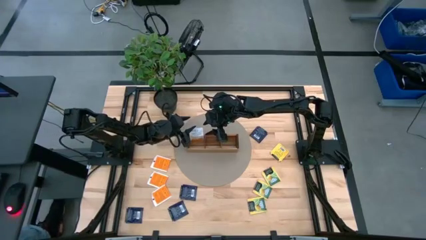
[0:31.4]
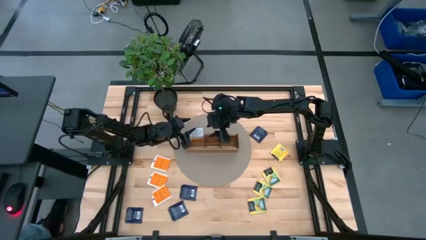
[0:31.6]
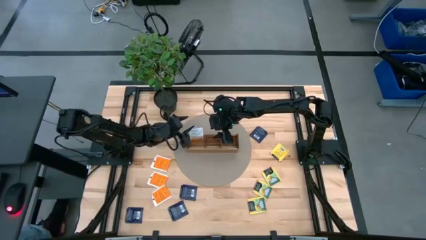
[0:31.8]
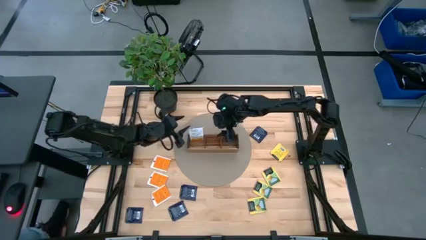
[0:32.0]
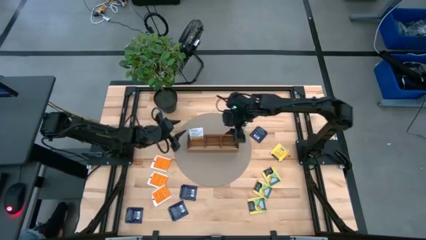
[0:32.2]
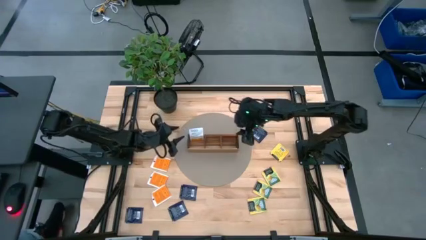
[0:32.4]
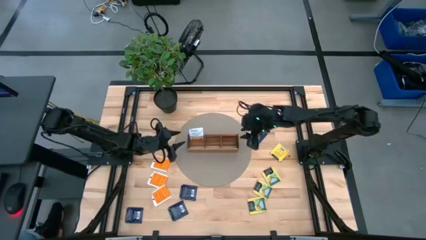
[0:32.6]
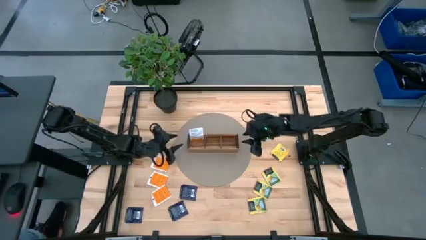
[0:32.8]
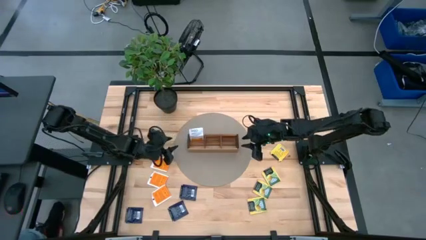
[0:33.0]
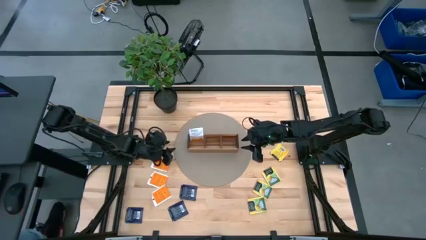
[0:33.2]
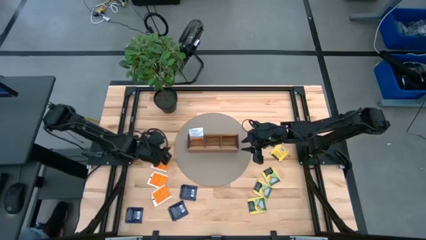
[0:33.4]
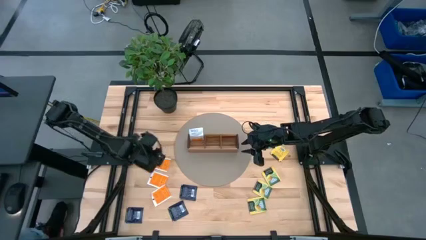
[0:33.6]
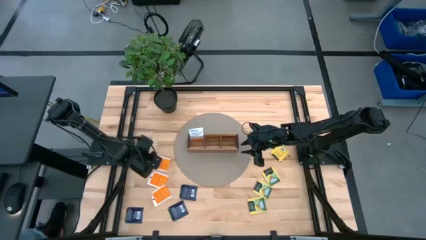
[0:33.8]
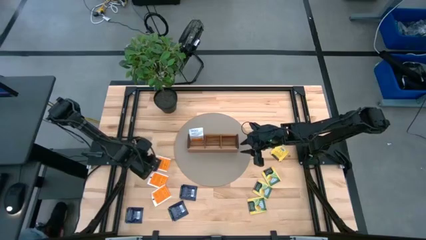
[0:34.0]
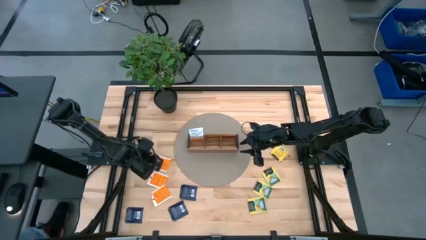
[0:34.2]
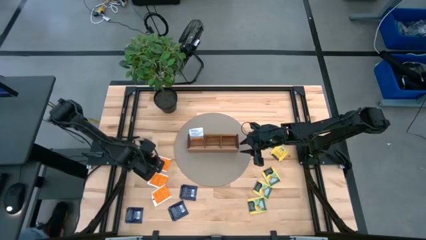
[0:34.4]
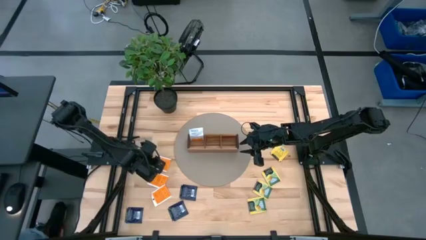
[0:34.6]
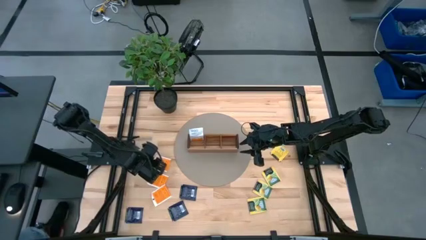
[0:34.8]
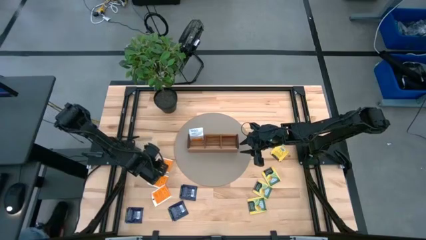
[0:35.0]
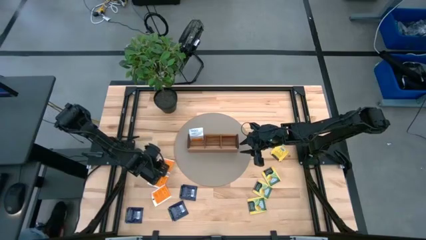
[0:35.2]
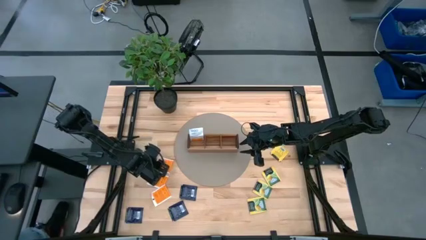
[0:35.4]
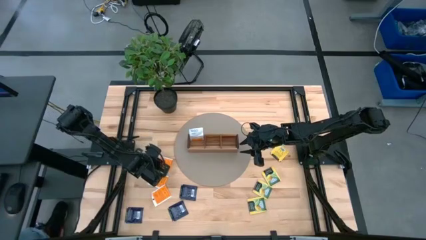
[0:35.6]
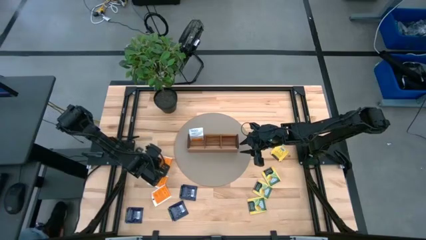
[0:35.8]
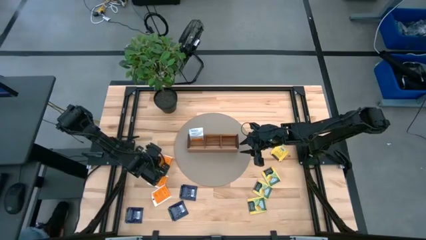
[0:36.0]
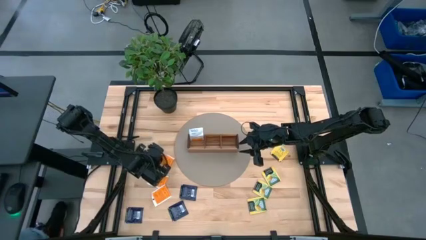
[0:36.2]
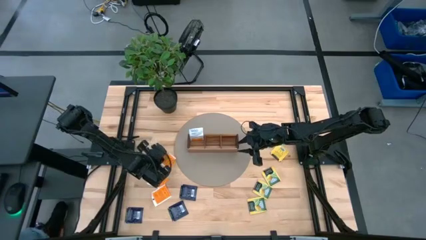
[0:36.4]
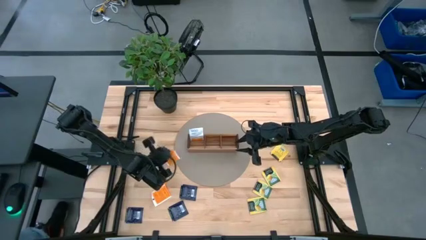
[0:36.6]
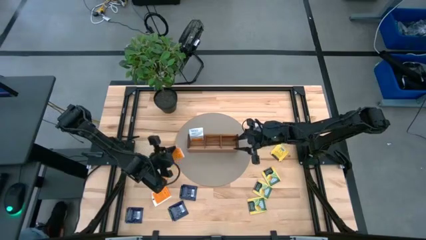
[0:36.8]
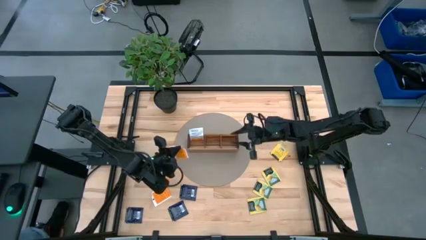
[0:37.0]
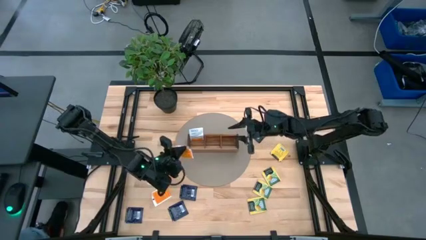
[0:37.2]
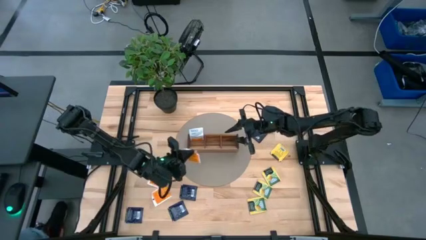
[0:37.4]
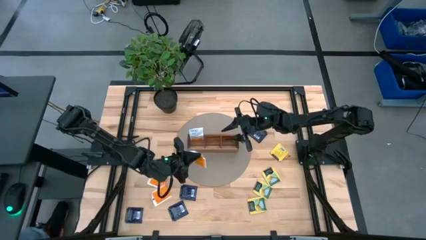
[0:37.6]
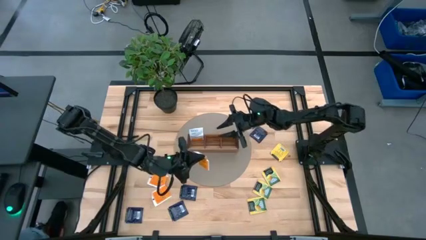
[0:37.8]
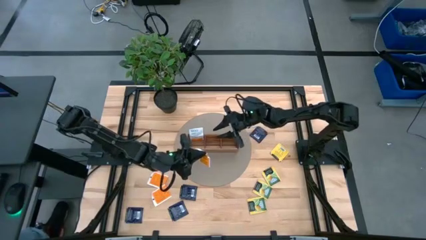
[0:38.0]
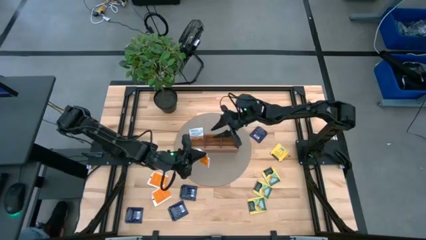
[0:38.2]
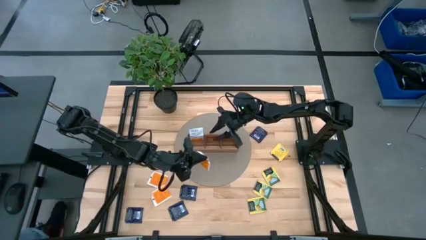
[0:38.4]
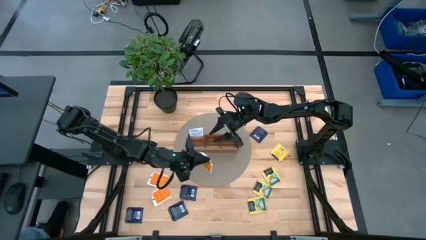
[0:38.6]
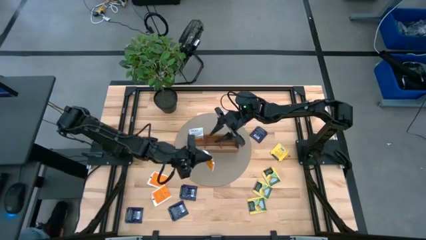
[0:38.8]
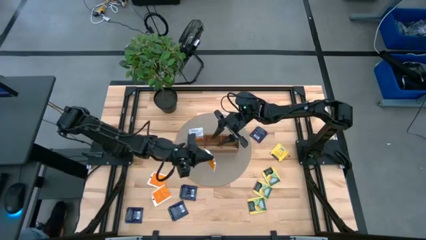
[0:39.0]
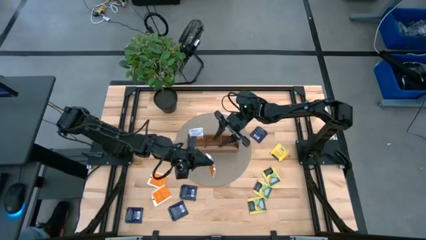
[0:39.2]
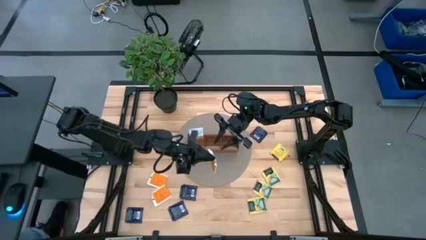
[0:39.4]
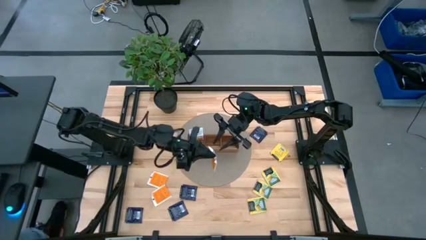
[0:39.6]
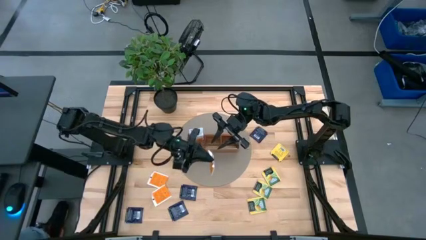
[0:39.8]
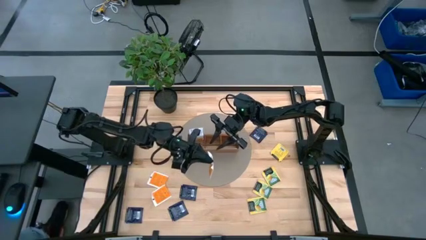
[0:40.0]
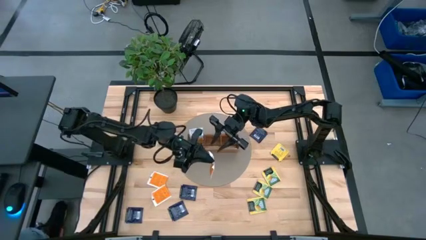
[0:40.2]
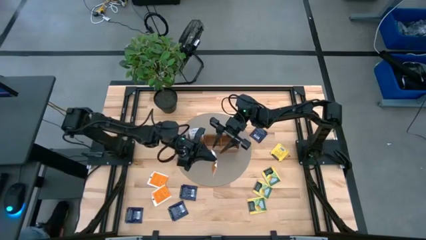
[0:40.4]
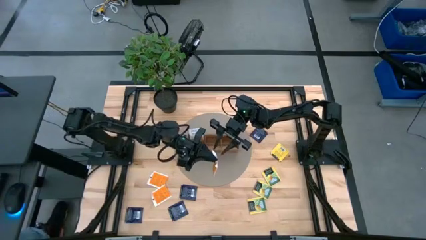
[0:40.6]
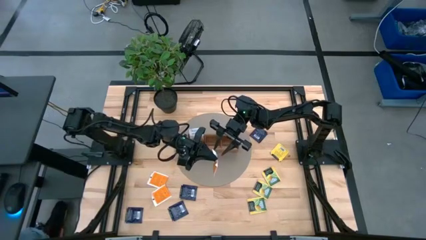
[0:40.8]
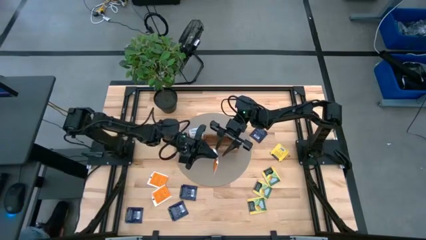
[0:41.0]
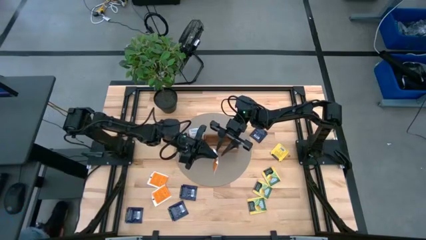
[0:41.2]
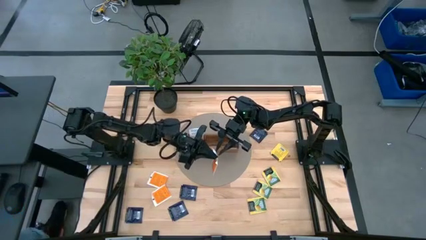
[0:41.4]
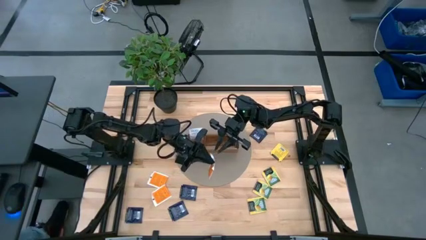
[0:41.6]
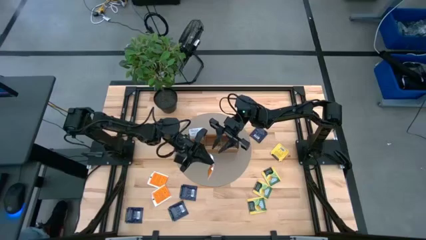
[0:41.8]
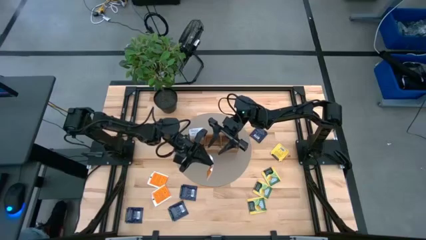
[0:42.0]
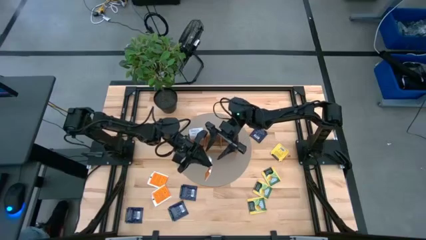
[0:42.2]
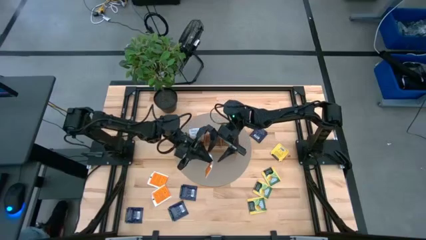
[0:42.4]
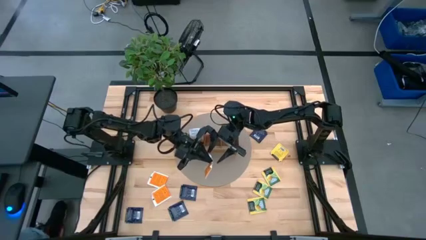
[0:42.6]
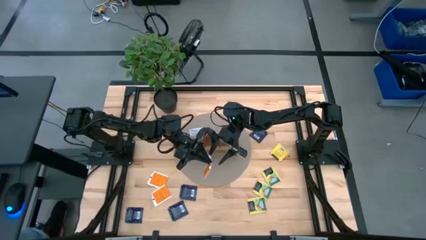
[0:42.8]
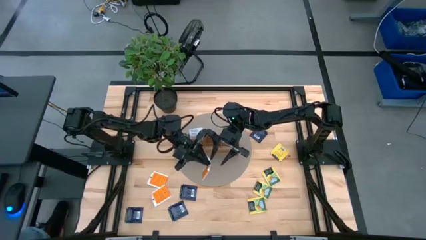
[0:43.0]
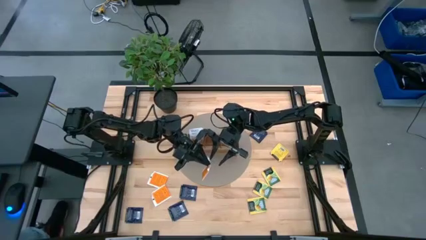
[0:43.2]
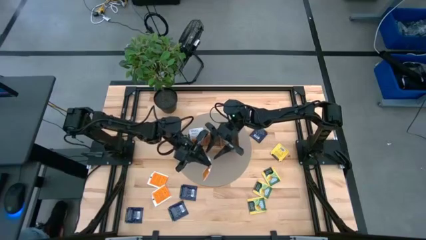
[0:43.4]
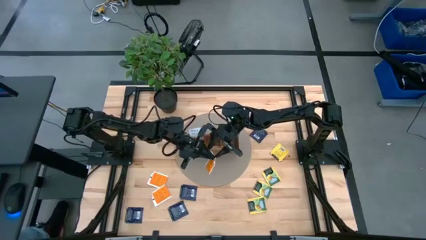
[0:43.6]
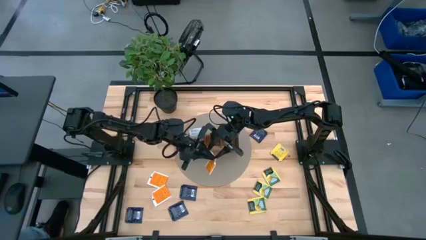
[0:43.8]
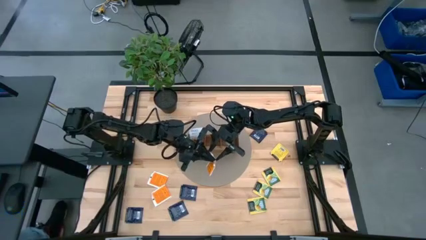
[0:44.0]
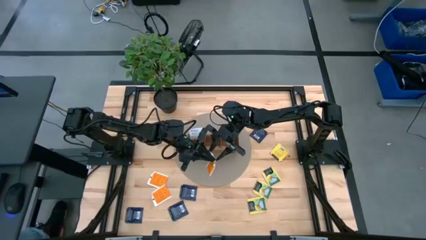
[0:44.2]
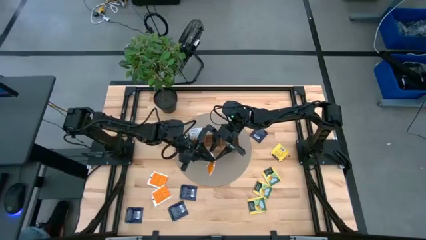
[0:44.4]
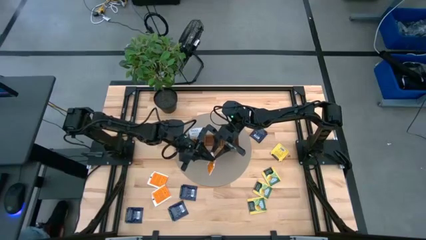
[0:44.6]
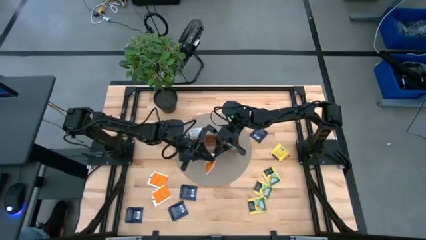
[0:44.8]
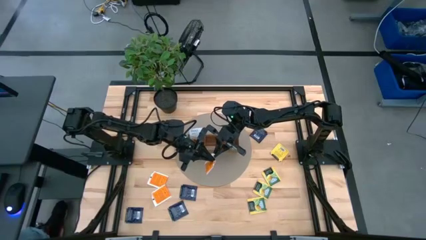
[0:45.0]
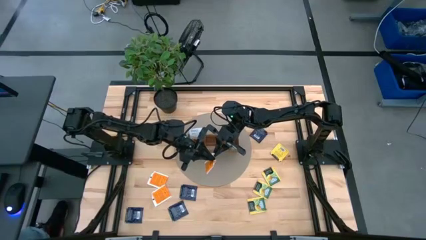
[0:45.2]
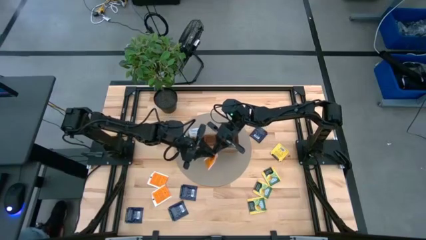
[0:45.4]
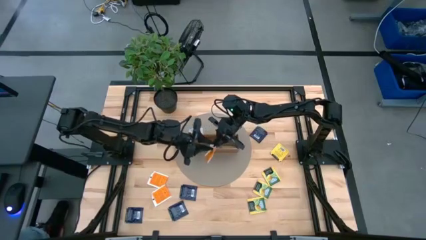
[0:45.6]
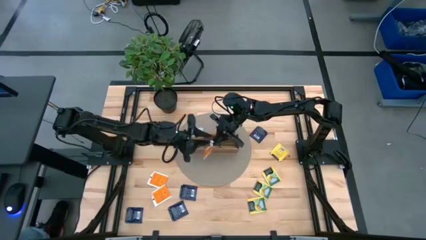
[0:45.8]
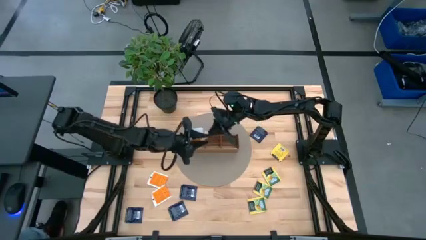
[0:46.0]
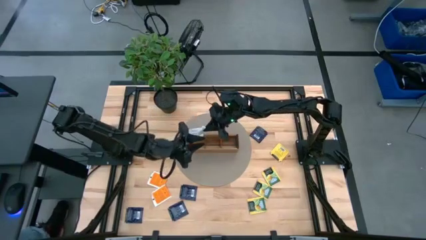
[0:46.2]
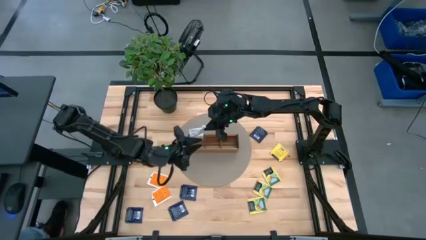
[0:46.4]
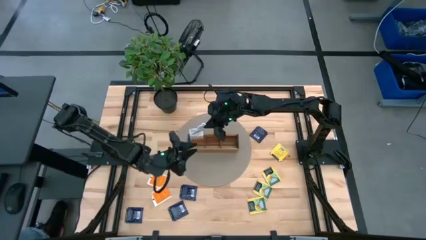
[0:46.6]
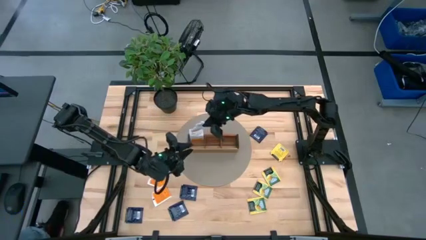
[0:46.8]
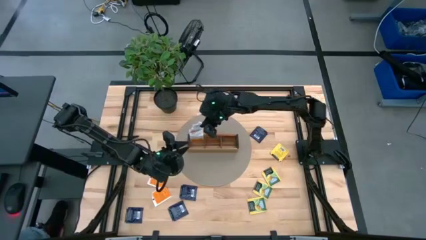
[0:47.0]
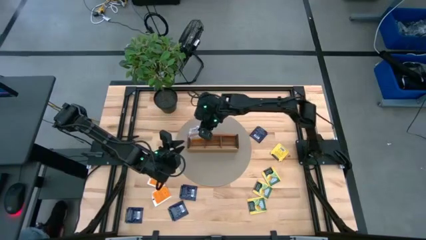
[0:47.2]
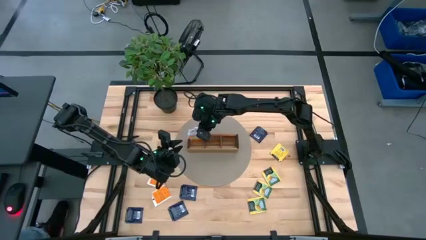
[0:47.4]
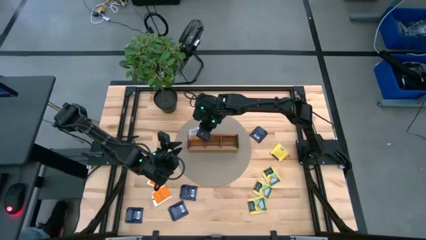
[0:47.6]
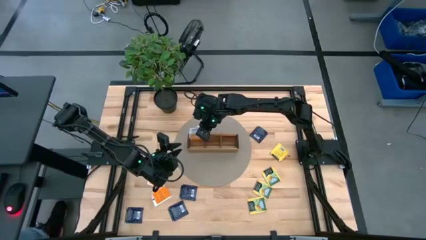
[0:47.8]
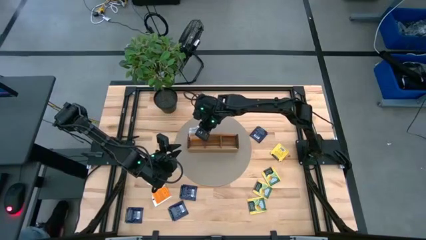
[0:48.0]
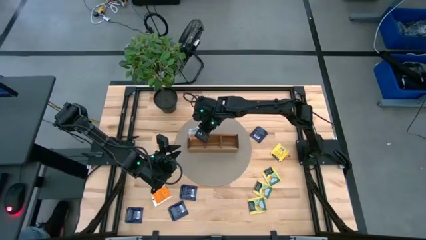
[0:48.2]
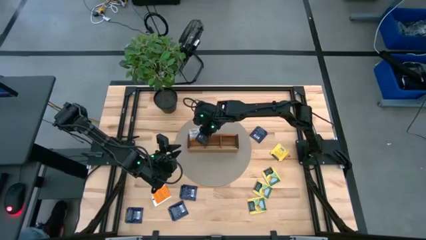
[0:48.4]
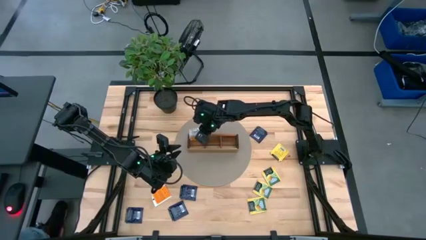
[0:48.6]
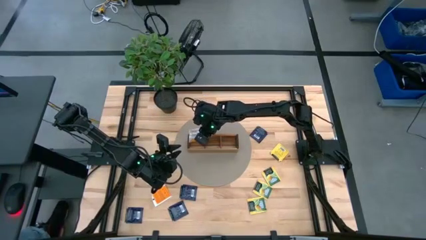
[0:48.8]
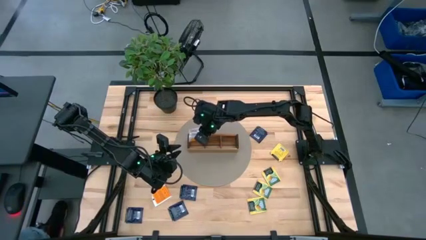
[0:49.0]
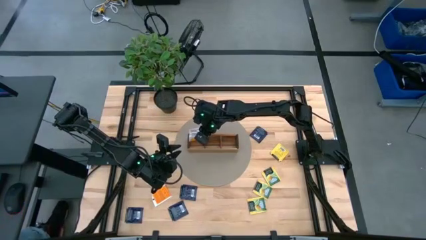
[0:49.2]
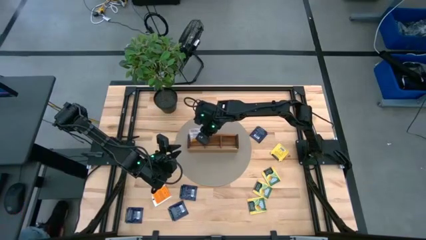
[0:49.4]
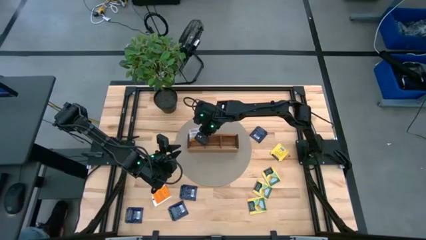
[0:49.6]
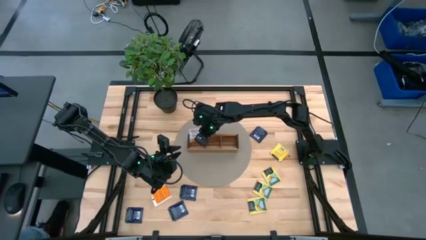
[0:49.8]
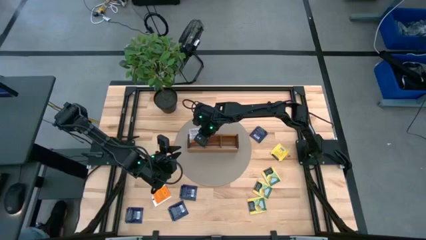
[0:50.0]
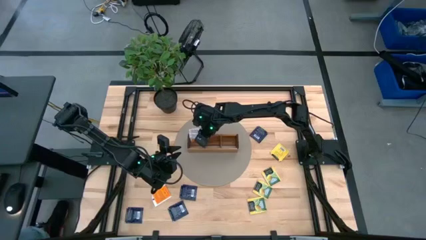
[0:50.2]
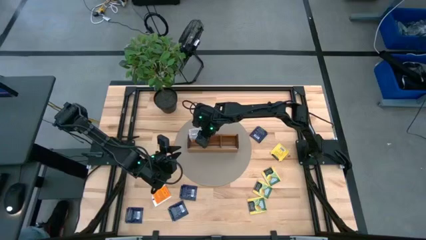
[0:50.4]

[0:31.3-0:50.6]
Task: Pick & Place Tea
Put the orange tea bag into the left section of the wooden organizer
